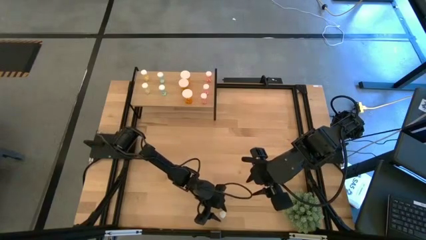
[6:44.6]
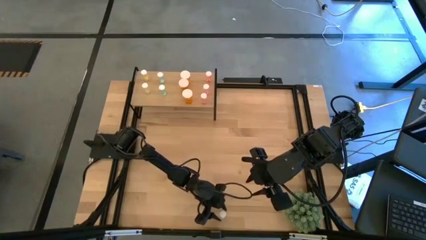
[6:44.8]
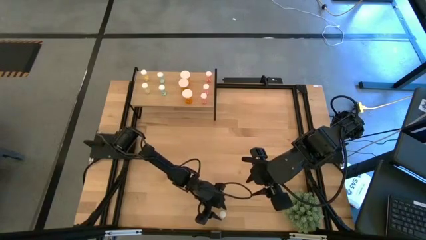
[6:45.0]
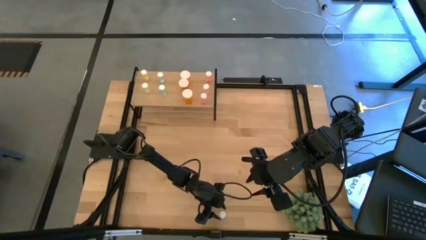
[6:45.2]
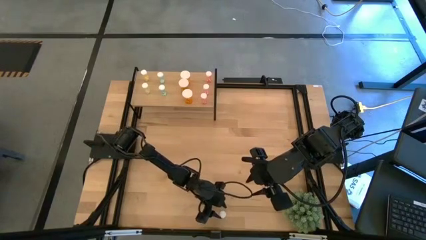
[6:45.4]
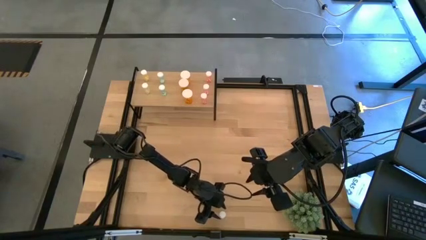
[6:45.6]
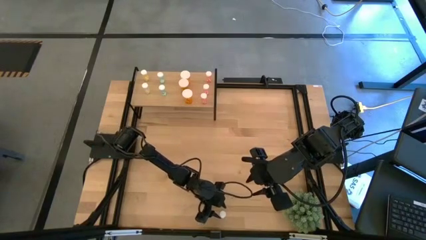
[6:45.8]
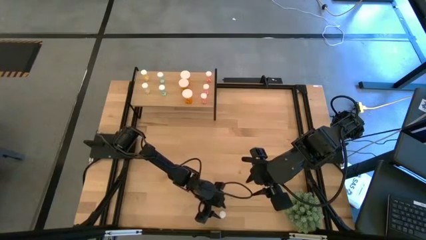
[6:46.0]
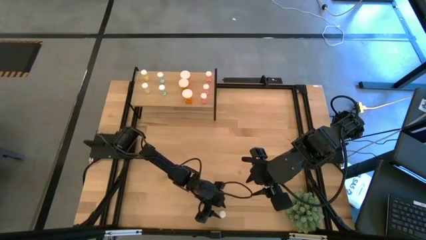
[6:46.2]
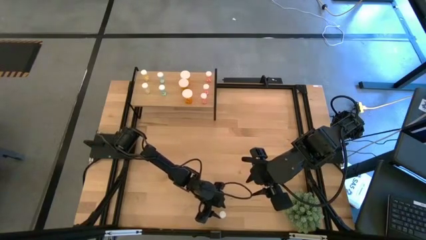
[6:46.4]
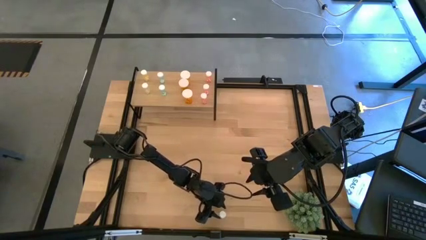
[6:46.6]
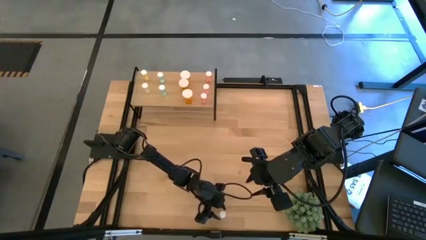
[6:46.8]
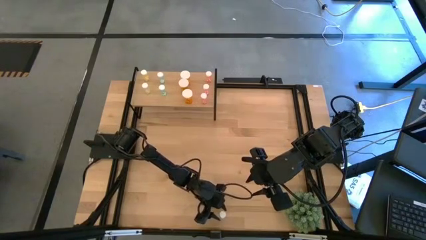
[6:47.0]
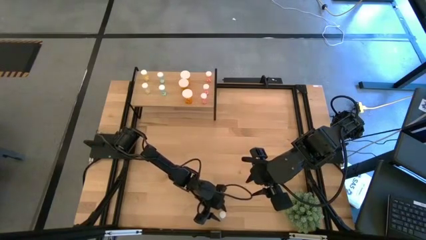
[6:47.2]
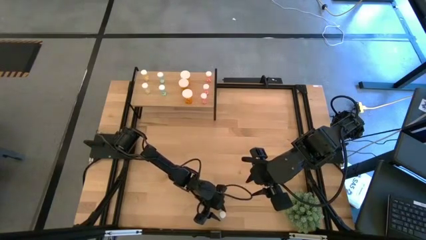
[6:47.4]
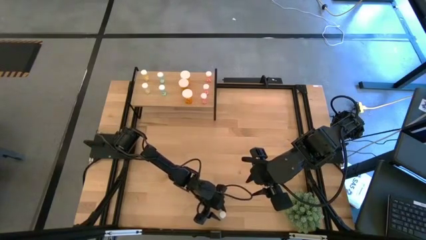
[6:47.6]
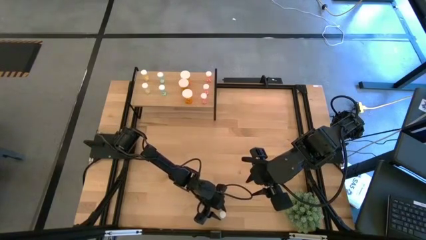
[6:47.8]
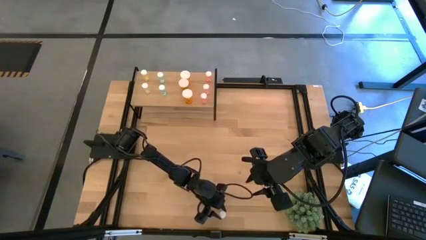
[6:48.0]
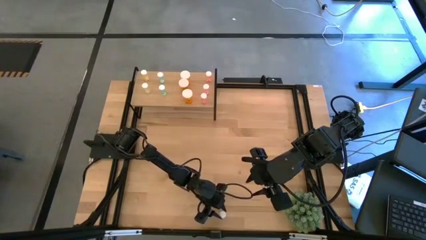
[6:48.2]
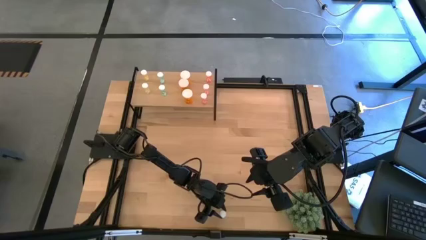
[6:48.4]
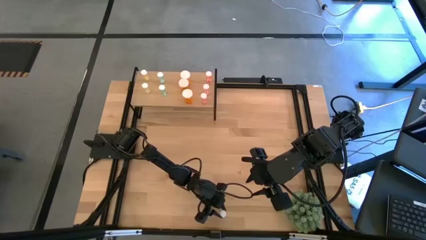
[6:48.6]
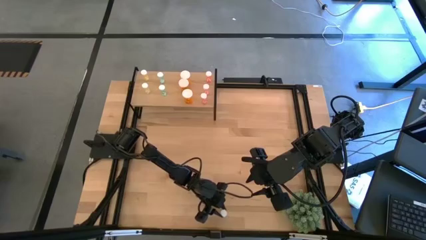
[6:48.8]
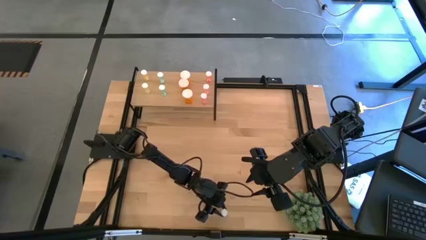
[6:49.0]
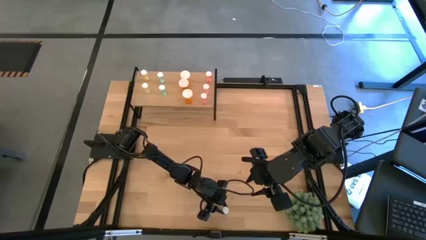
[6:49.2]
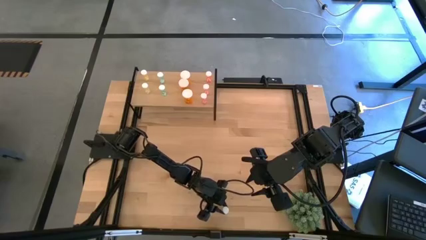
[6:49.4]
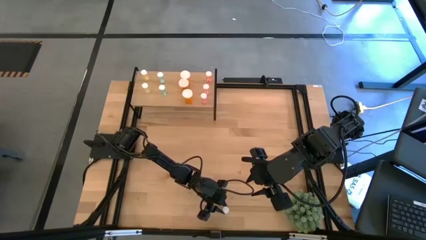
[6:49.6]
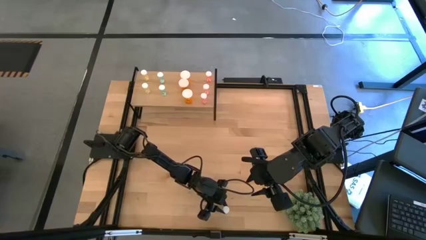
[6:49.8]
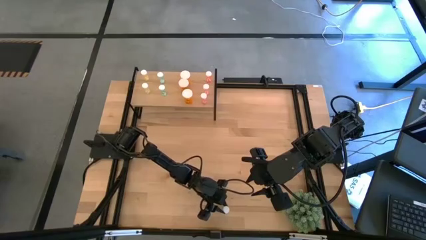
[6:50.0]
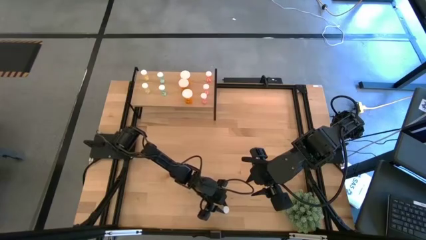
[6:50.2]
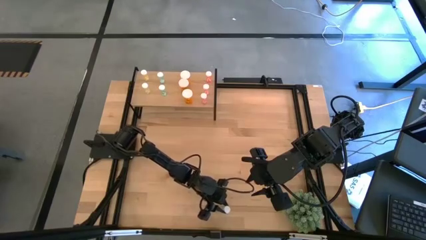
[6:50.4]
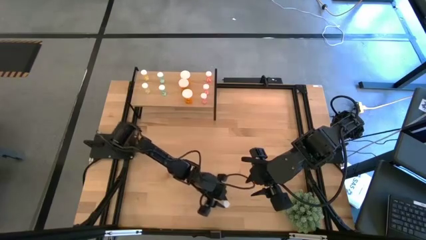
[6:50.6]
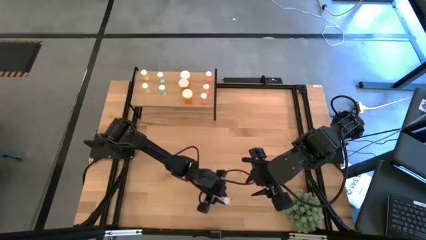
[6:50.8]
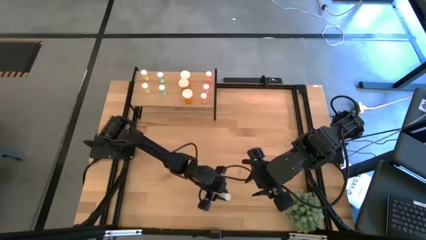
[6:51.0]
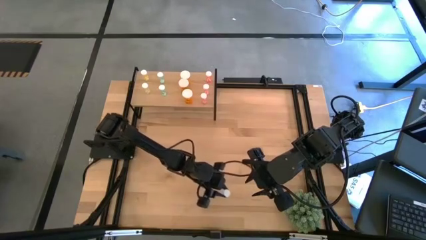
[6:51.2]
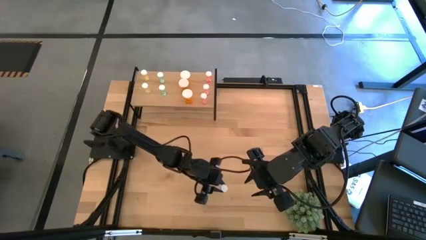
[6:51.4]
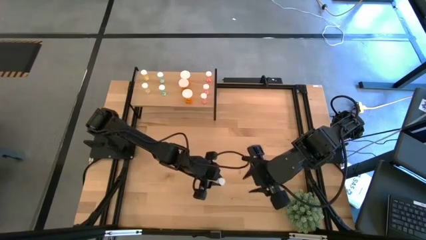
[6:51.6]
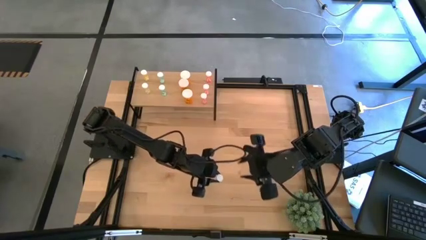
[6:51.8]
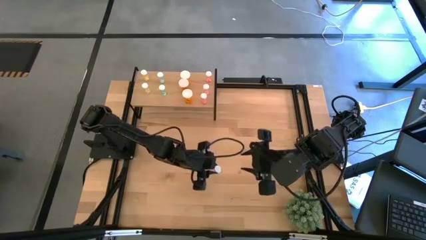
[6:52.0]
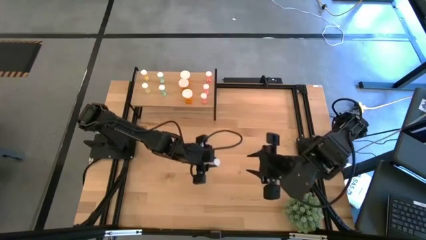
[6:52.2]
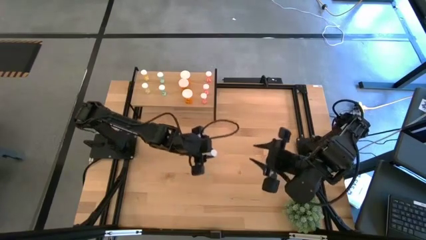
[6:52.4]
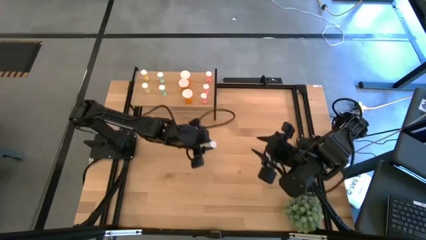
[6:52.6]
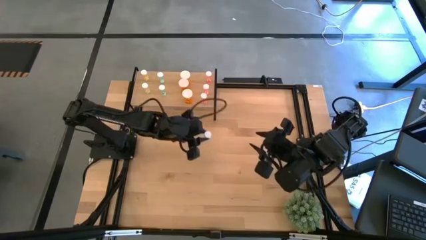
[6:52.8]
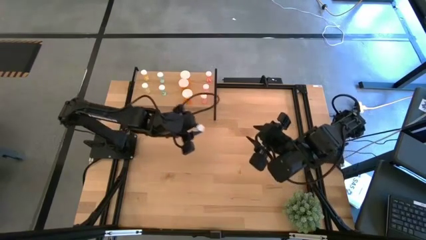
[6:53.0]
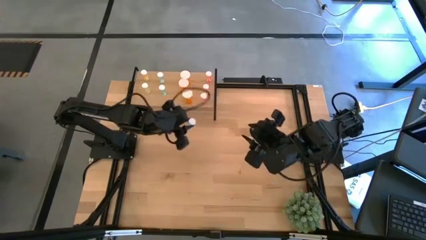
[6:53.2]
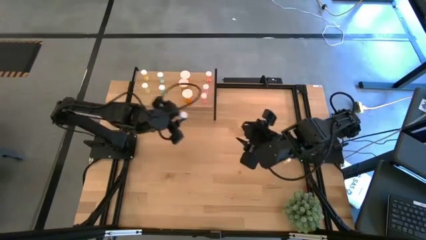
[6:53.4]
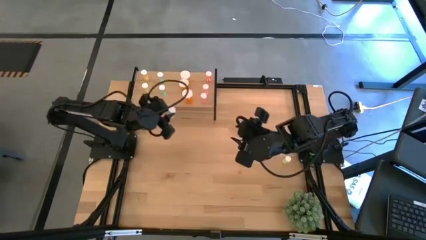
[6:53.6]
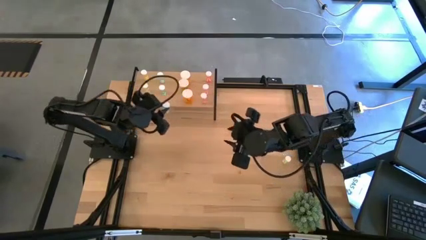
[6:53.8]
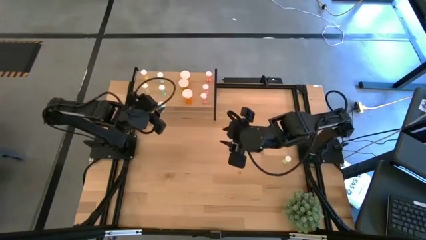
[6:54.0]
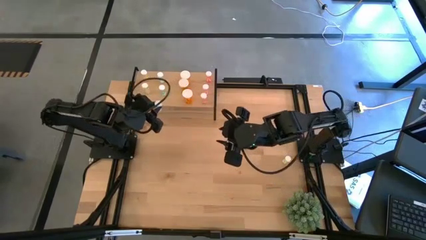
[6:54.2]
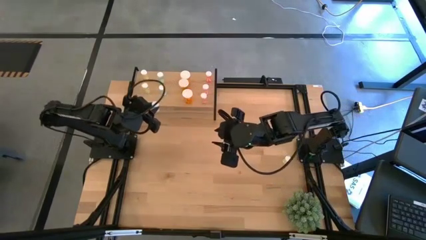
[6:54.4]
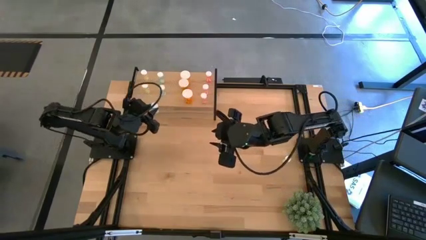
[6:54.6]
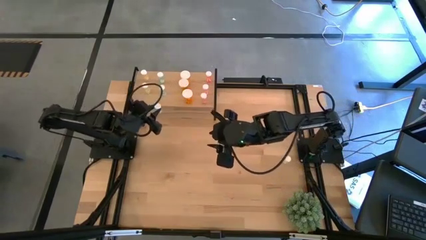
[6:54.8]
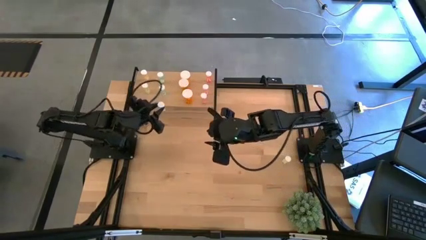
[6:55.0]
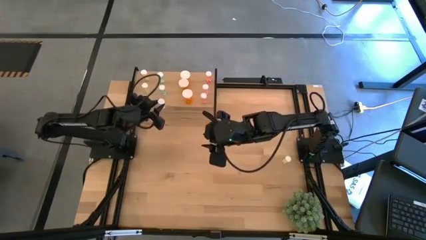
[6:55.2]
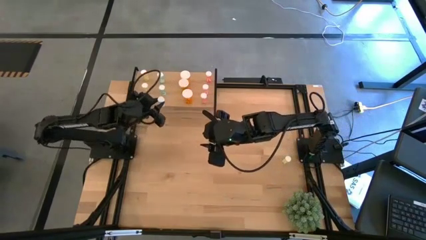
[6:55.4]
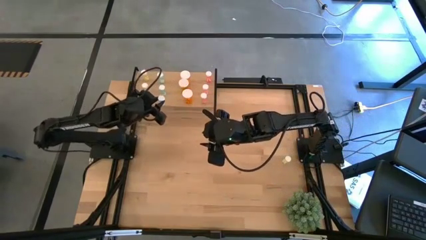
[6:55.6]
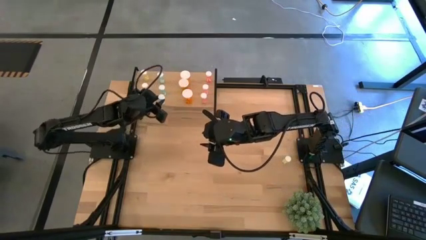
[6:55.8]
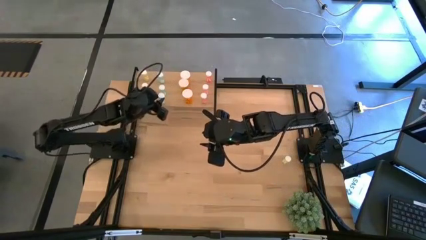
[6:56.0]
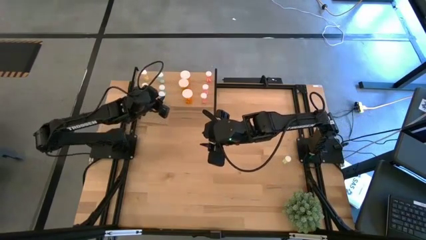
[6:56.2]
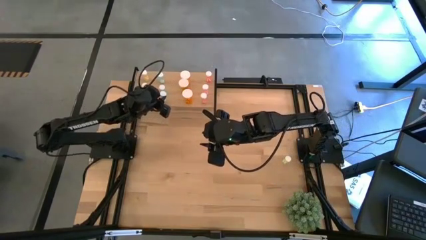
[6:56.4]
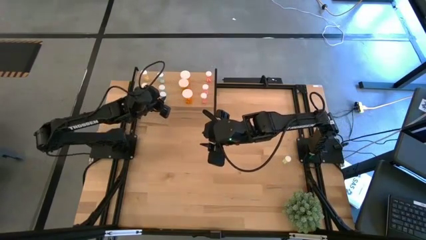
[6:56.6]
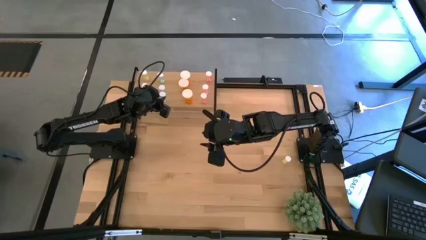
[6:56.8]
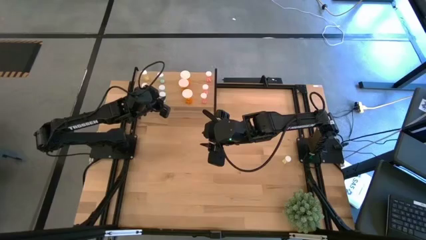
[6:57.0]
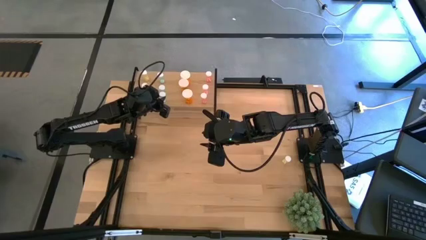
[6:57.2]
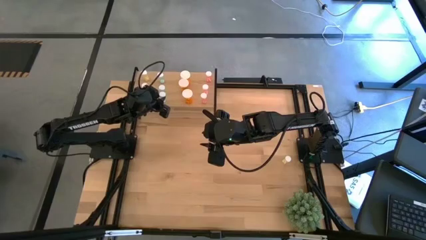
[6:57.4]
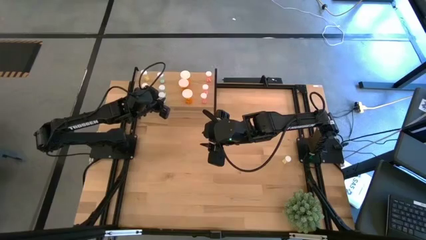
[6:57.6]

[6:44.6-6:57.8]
Task: Pick and place medicine bottles onto shelf by color
Put the blue pill bottle on the shelf aligned with the blue pill bottle on the shelf
